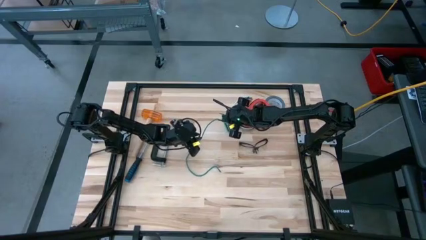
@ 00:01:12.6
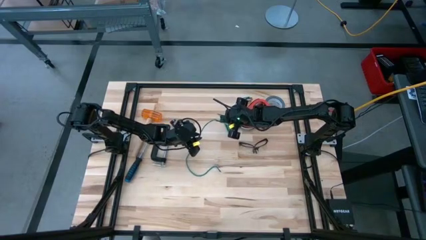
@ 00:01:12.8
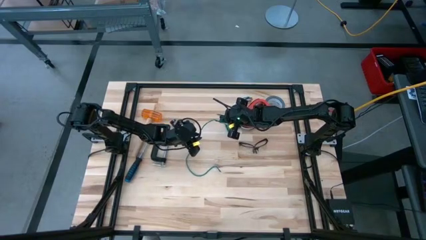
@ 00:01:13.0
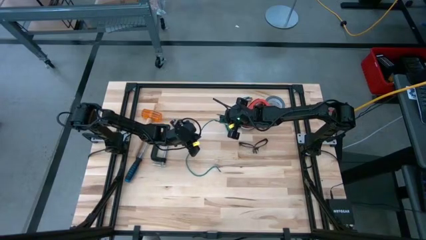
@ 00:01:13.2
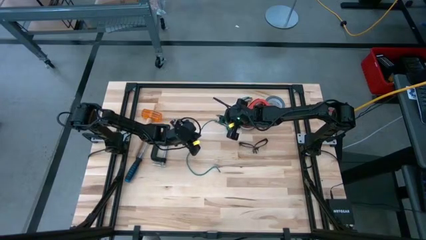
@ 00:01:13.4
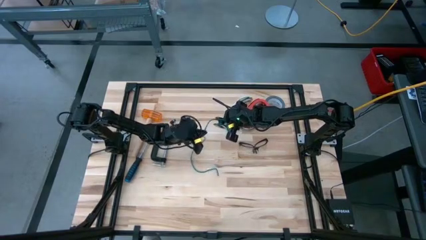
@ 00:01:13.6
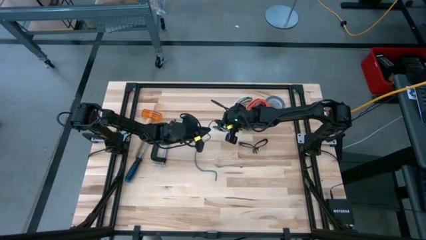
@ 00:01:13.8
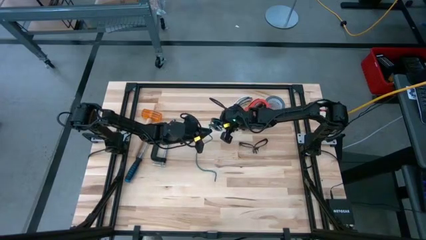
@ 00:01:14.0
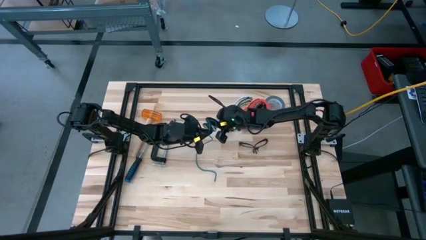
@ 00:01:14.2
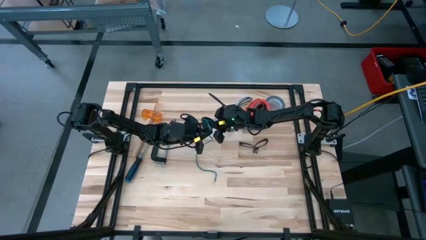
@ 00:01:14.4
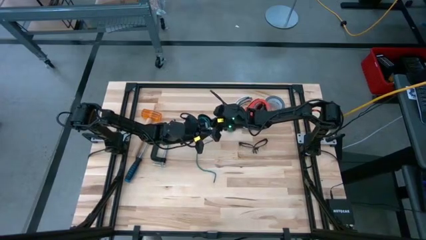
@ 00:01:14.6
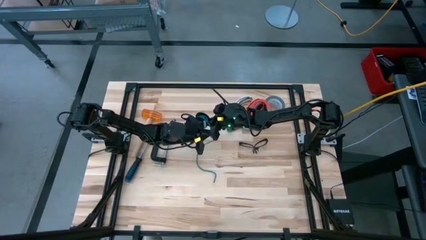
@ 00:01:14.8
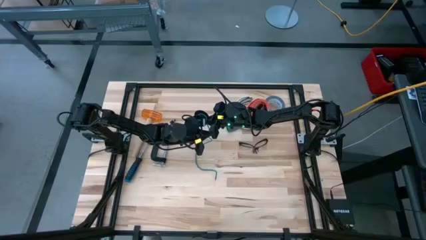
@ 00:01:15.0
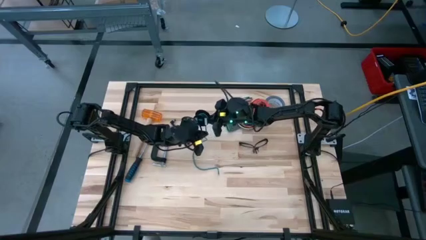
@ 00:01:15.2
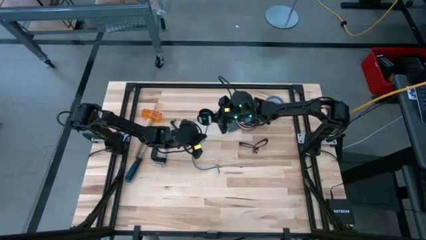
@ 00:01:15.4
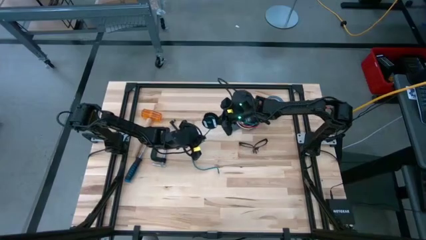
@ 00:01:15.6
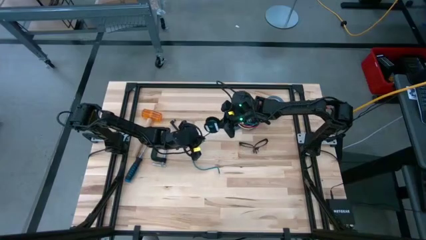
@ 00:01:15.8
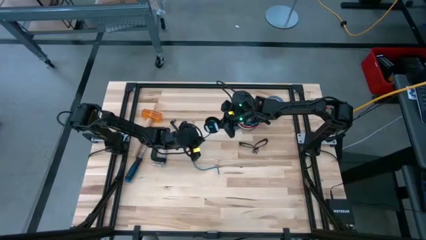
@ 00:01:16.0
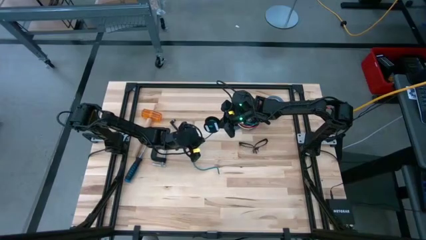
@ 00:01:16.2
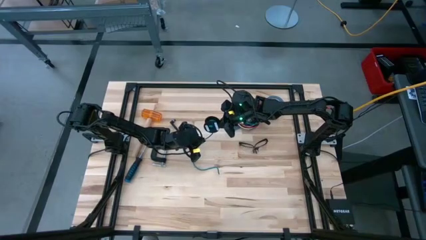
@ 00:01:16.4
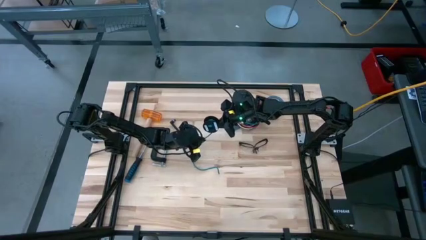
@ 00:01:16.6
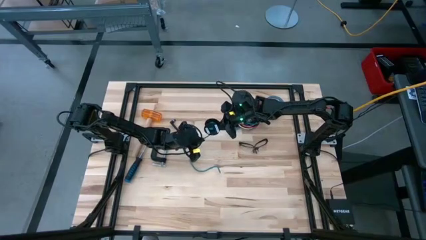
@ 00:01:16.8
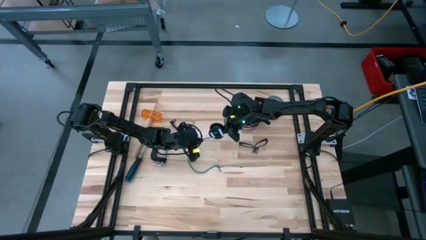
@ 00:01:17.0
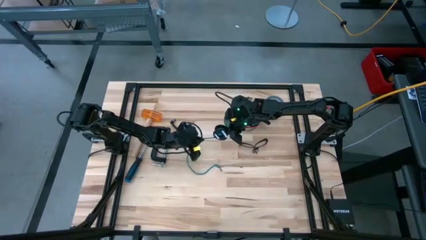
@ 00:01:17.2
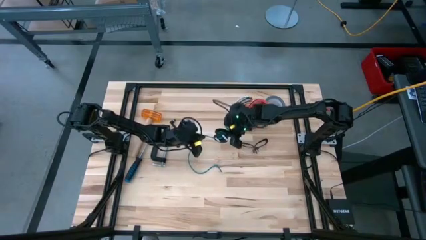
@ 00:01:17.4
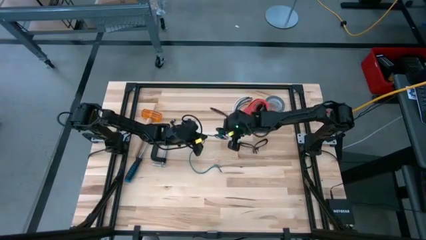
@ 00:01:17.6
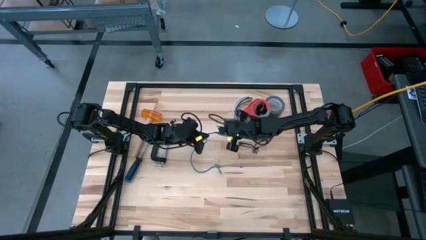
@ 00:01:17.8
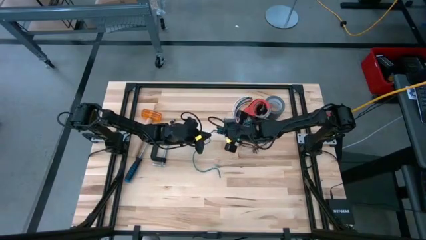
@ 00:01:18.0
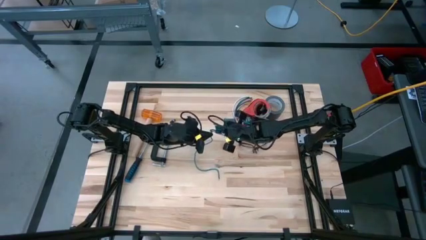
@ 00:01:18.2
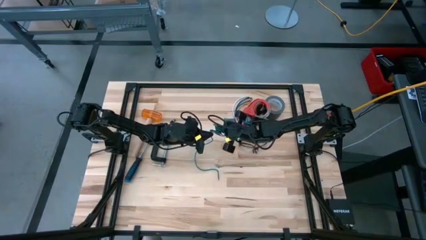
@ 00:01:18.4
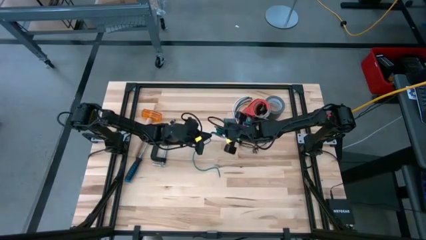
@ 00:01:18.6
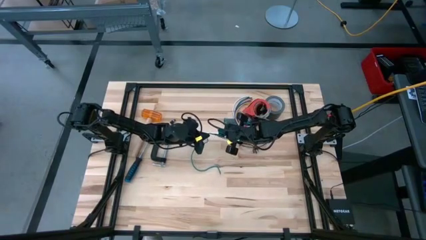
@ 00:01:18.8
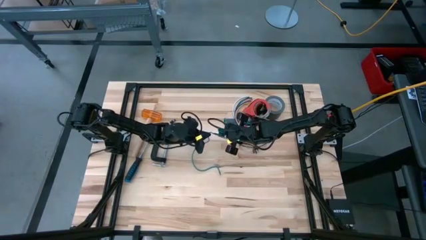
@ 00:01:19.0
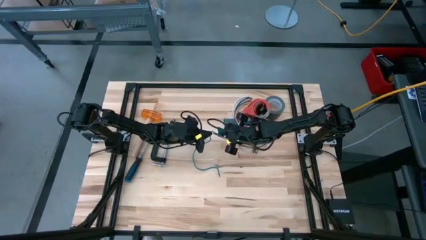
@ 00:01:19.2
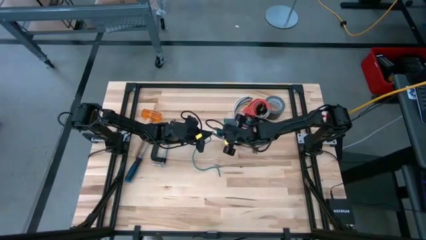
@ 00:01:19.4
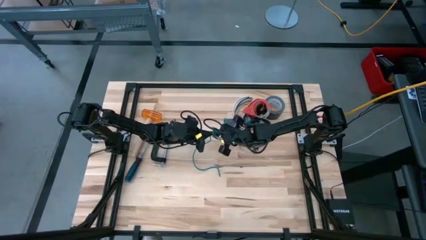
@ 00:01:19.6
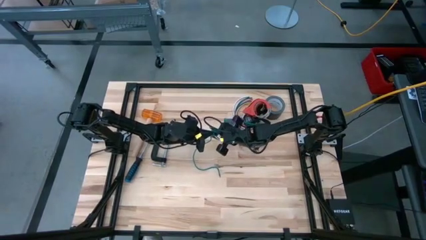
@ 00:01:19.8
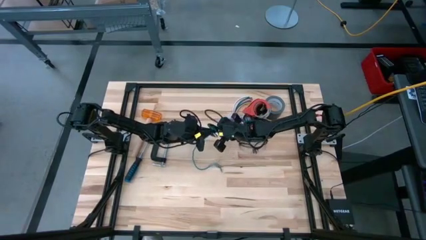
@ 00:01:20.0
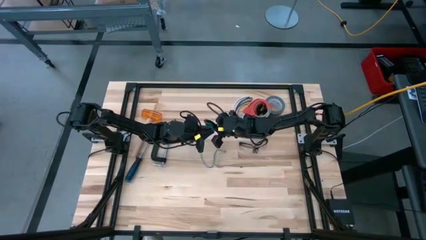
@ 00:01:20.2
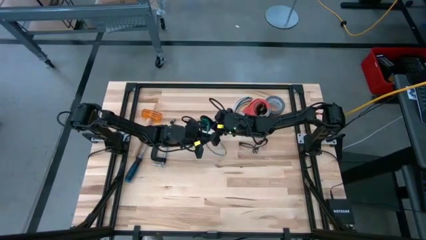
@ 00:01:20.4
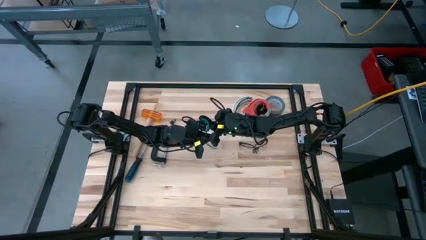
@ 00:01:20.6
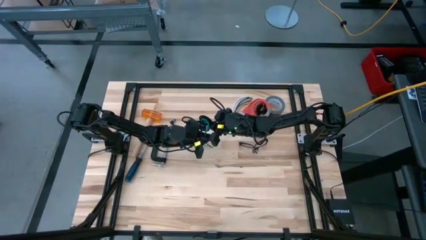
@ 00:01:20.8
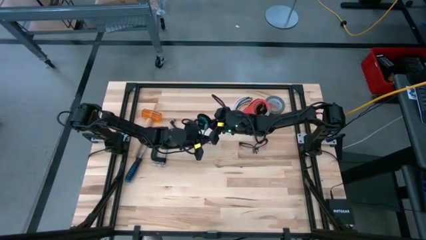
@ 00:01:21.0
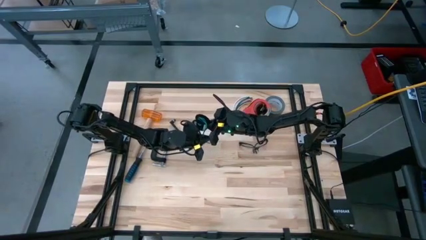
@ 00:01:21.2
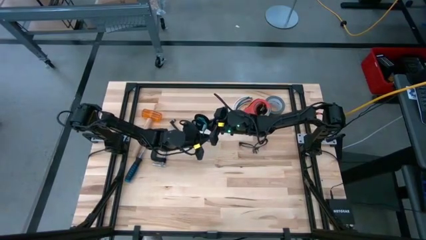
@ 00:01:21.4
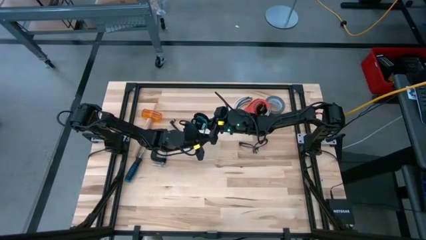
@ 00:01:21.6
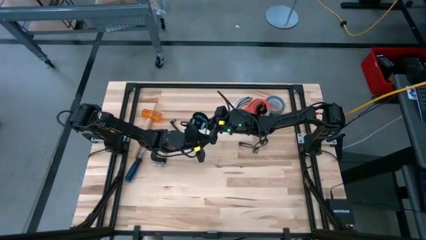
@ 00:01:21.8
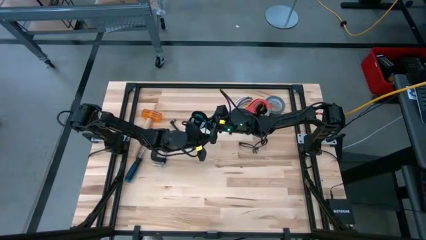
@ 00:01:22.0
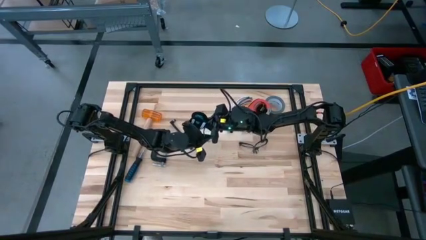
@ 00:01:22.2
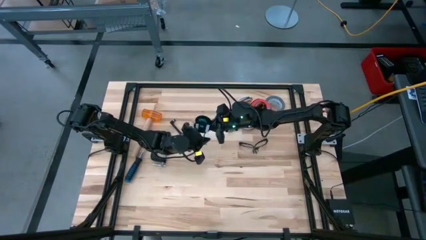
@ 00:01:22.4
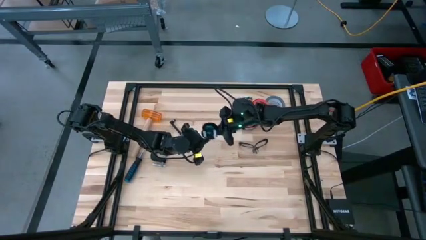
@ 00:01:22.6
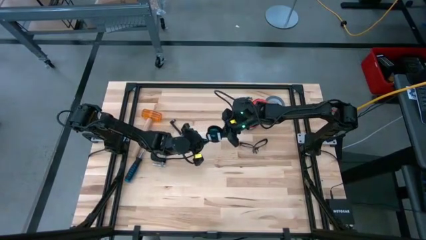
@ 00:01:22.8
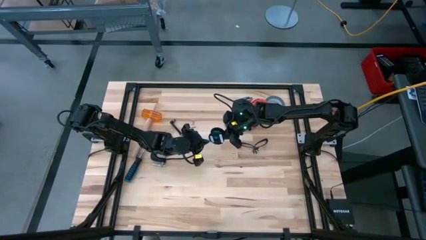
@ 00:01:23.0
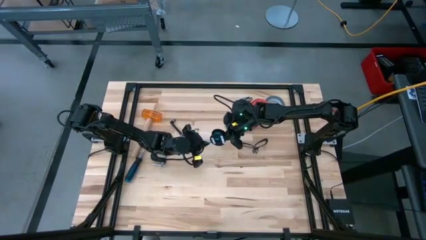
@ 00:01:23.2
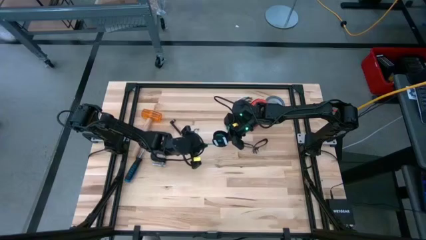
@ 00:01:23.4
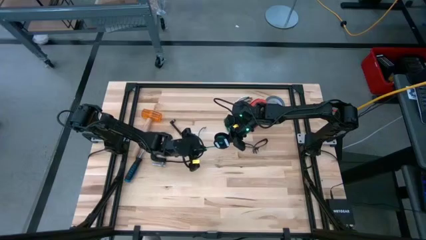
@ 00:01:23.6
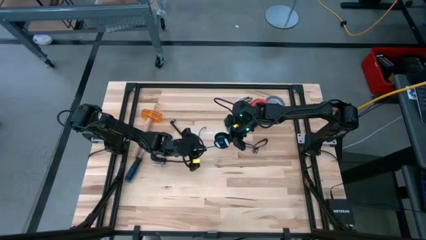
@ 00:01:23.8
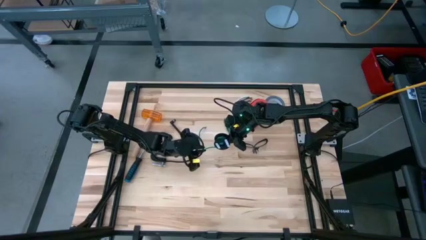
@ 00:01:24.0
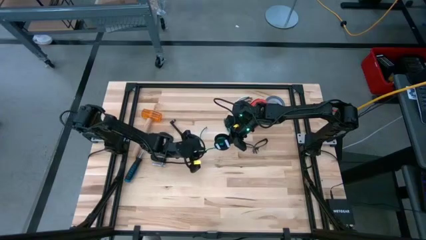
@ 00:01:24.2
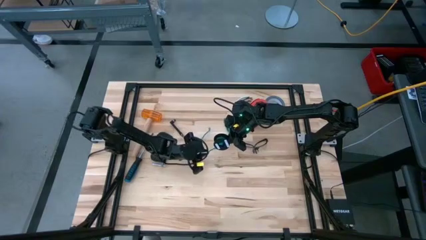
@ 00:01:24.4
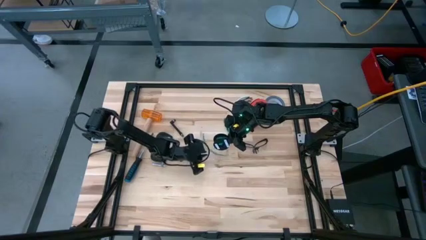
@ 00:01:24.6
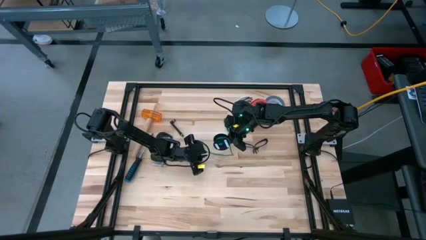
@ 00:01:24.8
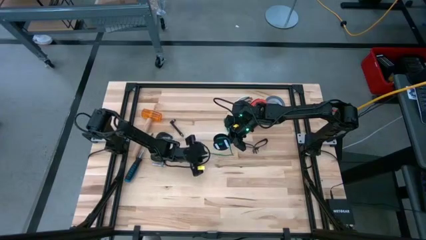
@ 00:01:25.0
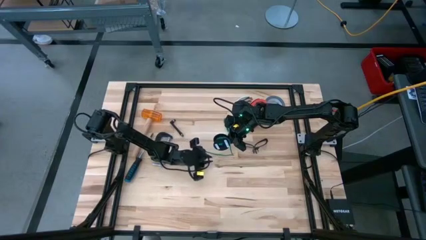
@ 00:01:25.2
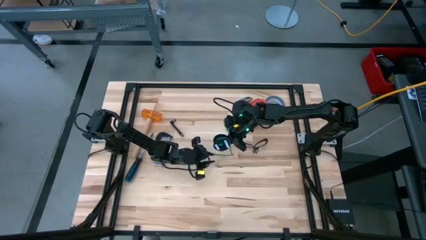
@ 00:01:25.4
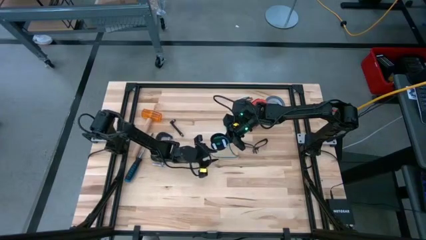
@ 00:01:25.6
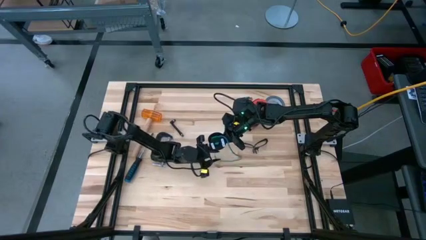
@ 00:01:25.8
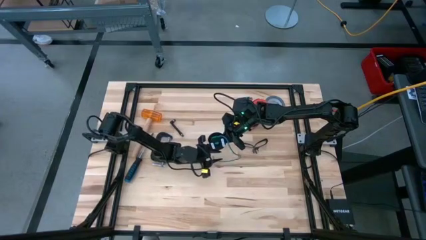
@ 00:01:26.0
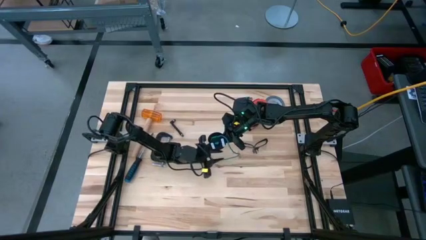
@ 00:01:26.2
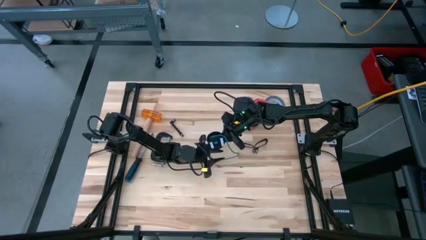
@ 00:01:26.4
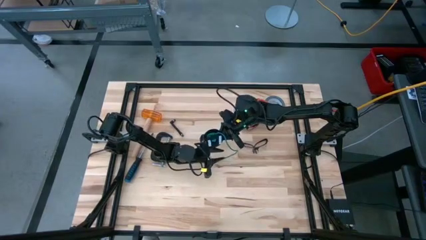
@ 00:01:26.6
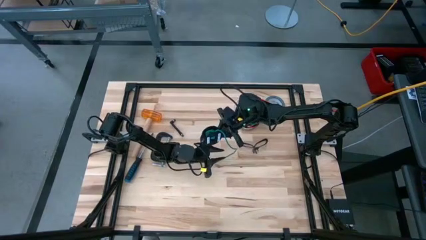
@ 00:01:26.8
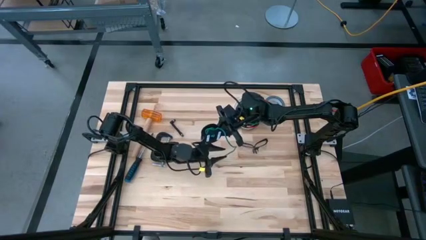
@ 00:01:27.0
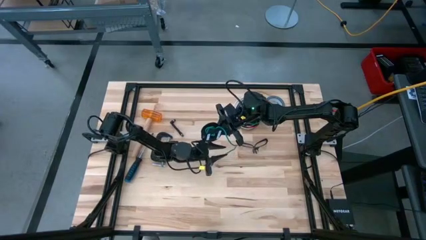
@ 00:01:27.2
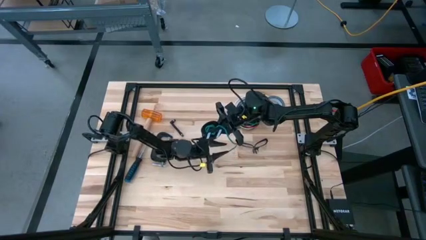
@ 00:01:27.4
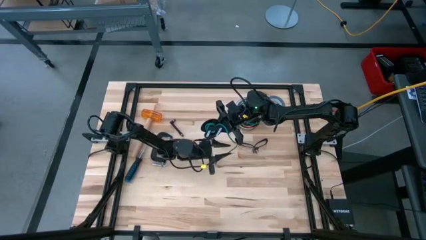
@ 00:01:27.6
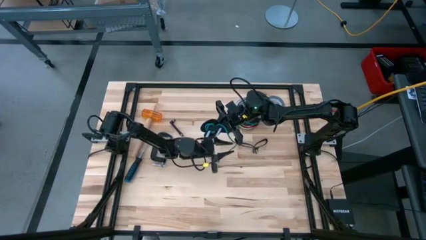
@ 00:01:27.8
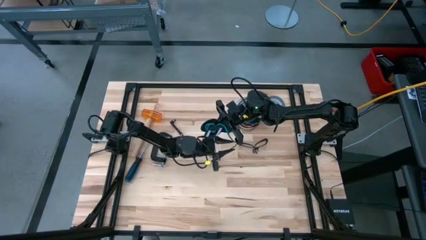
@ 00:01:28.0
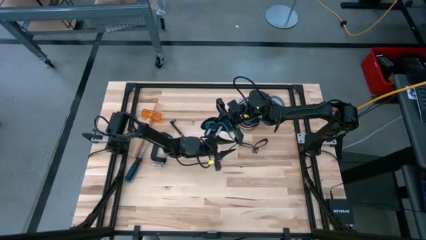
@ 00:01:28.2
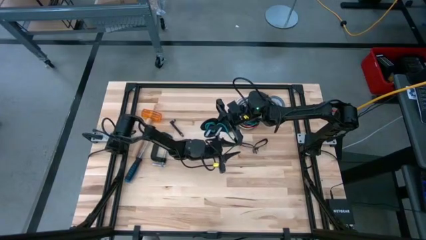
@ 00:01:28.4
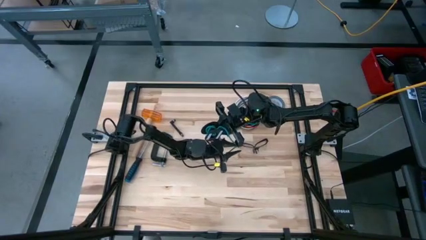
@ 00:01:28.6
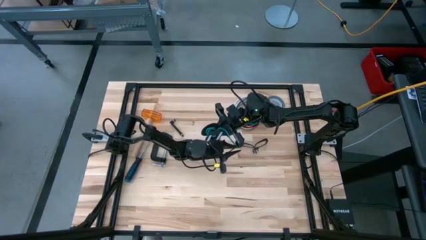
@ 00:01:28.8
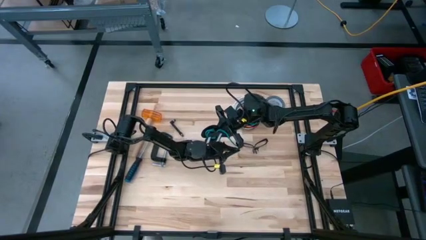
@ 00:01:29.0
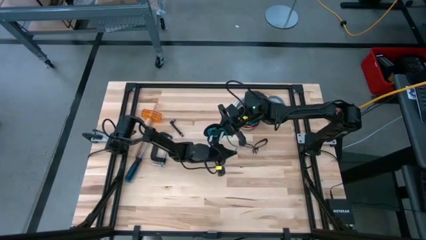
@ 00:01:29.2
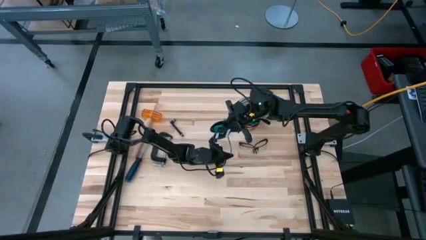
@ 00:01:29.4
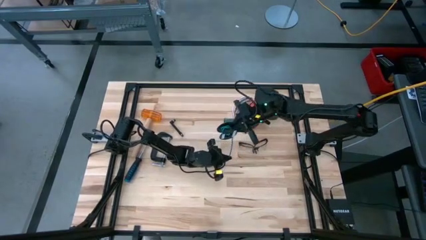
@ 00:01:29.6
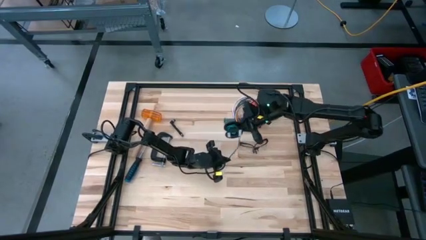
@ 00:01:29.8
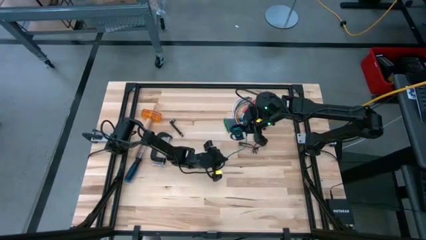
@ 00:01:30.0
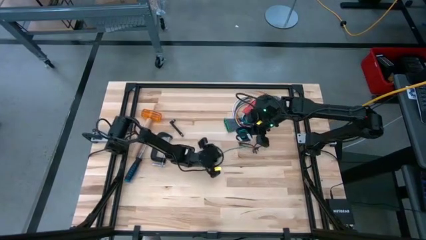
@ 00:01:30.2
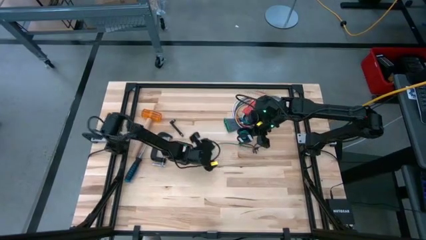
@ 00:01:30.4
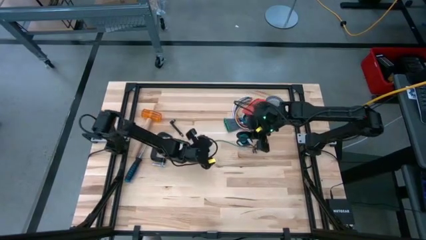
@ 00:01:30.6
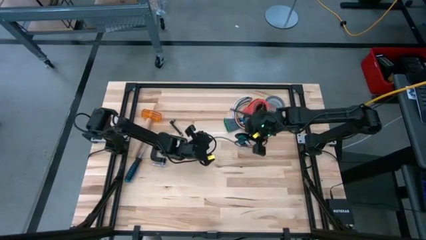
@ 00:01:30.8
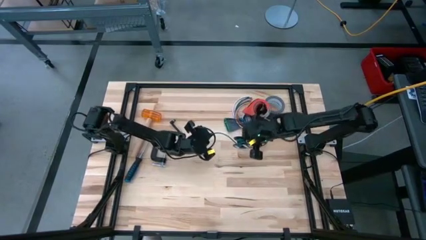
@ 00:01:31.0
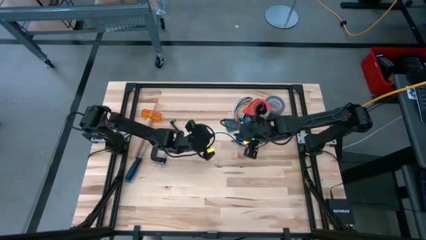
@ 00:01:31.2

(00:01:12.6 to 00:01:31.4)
Task: Coil cords
Coil the green wire to the spool
